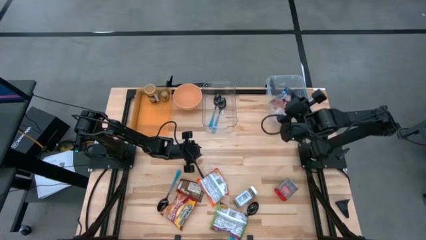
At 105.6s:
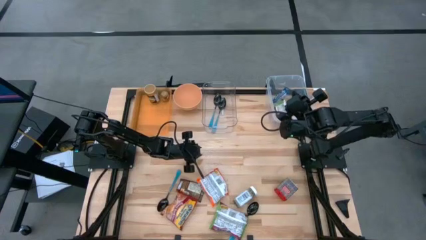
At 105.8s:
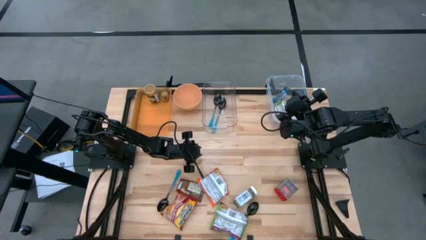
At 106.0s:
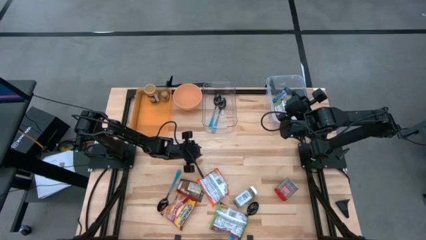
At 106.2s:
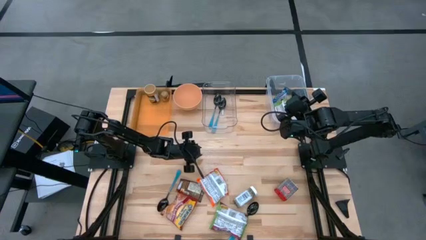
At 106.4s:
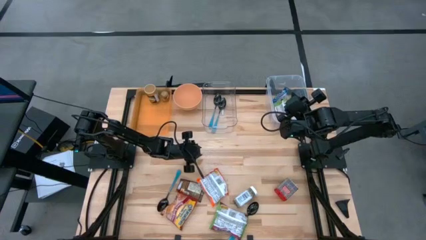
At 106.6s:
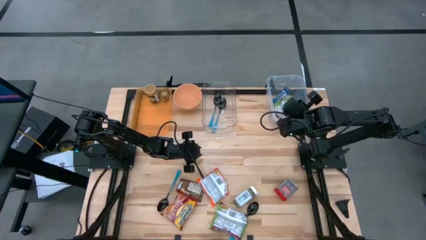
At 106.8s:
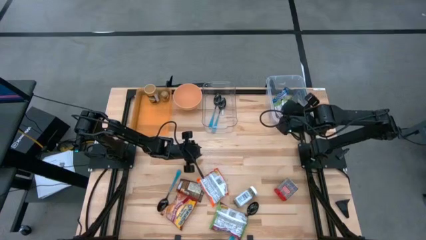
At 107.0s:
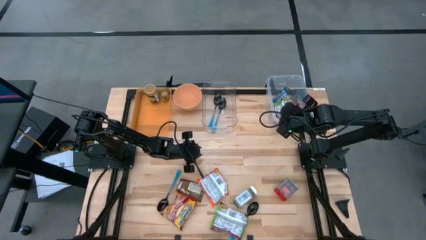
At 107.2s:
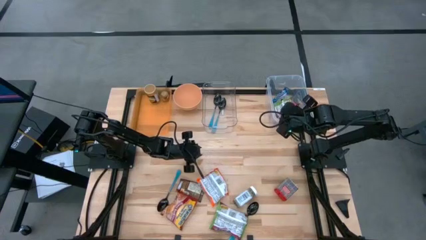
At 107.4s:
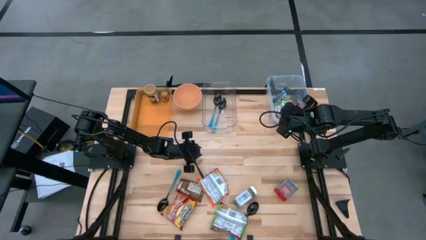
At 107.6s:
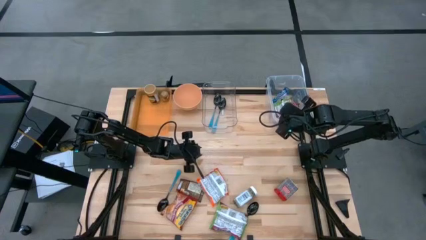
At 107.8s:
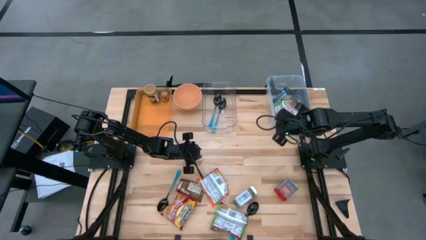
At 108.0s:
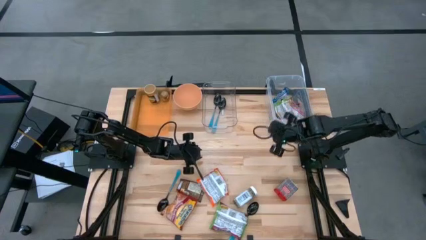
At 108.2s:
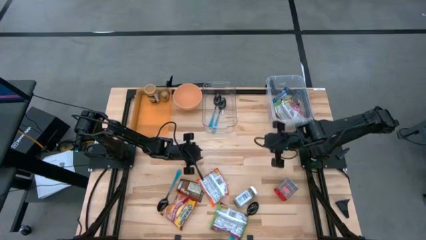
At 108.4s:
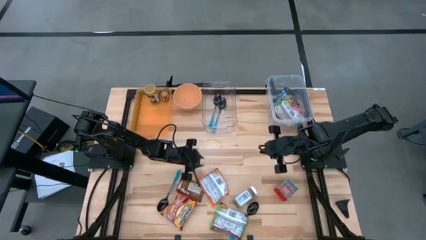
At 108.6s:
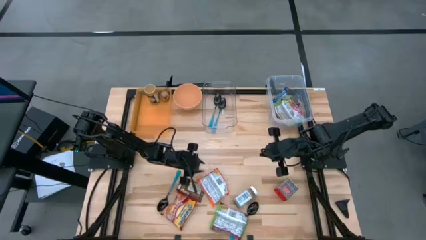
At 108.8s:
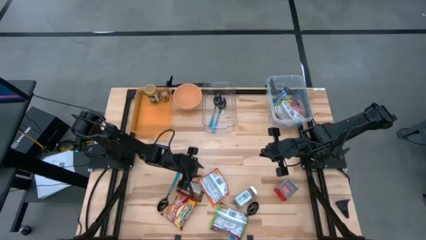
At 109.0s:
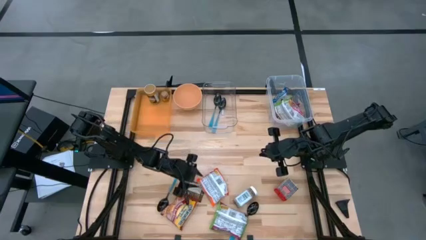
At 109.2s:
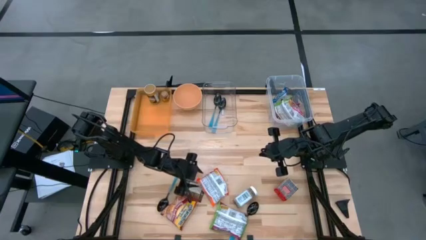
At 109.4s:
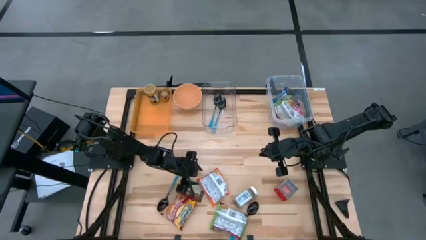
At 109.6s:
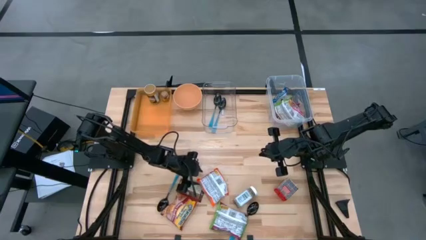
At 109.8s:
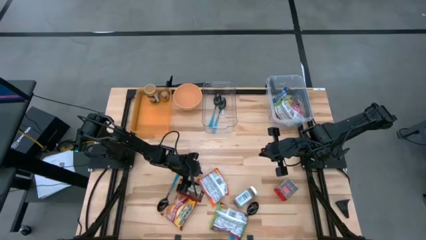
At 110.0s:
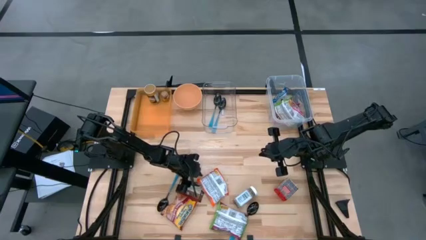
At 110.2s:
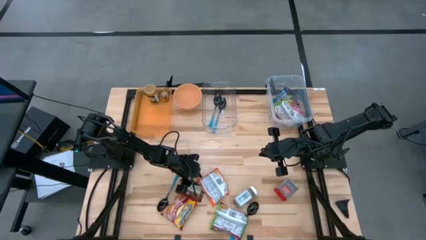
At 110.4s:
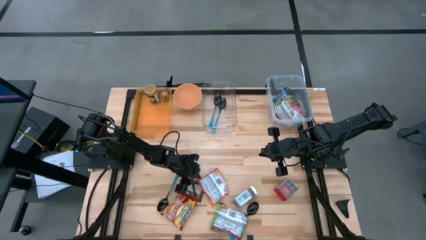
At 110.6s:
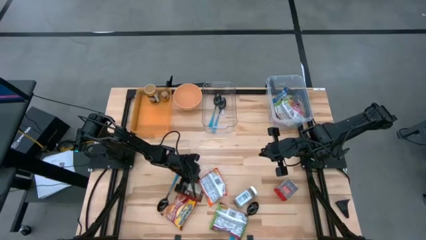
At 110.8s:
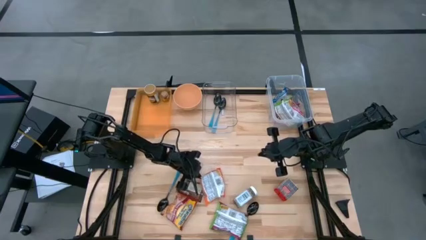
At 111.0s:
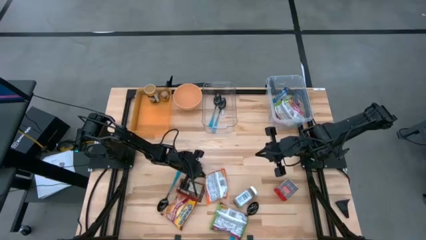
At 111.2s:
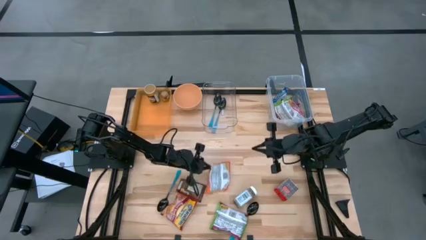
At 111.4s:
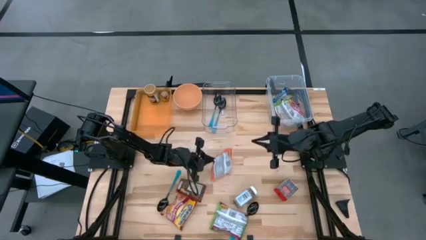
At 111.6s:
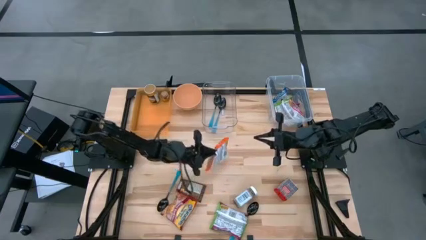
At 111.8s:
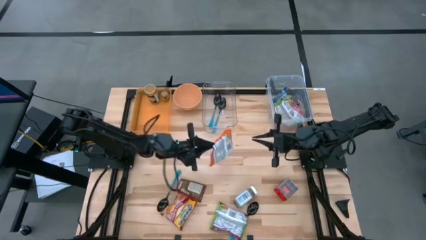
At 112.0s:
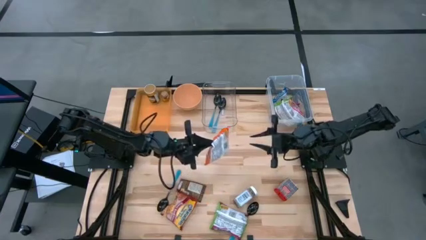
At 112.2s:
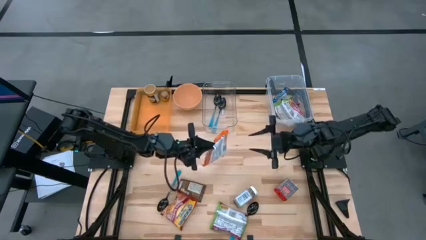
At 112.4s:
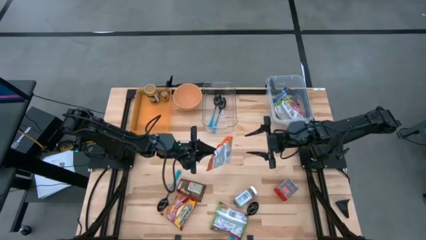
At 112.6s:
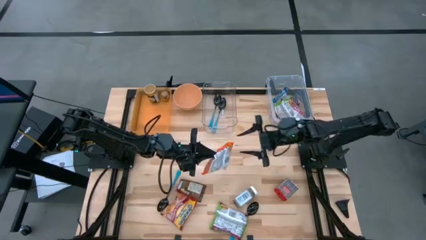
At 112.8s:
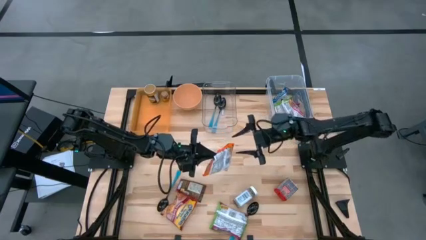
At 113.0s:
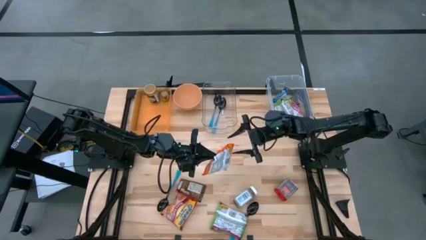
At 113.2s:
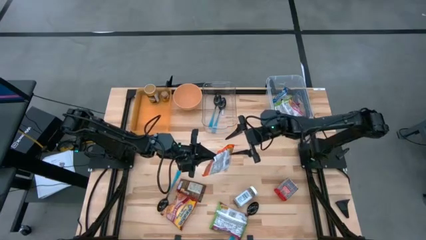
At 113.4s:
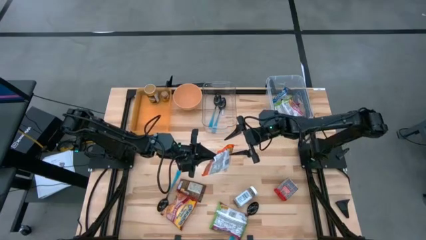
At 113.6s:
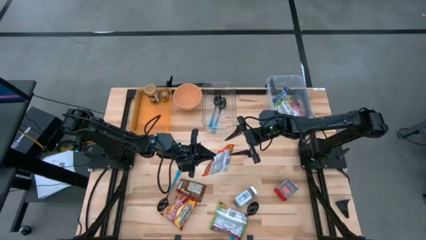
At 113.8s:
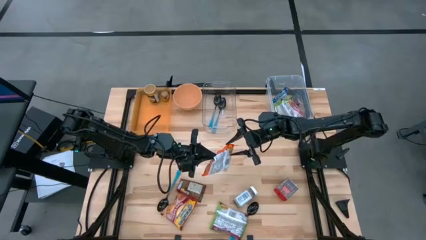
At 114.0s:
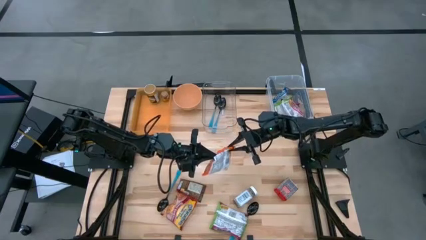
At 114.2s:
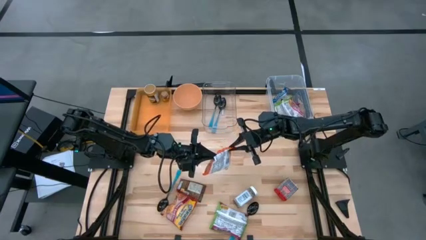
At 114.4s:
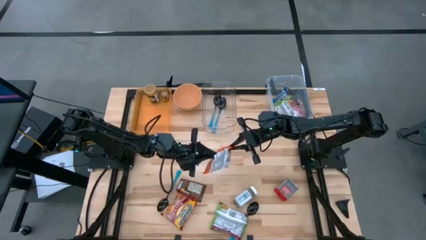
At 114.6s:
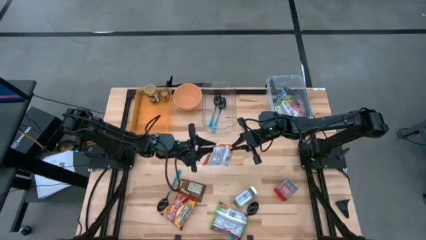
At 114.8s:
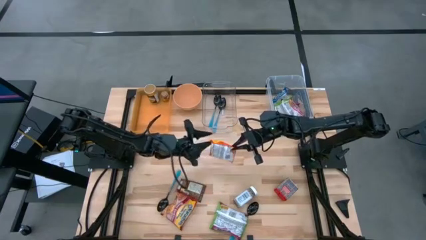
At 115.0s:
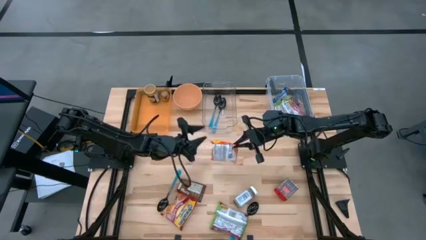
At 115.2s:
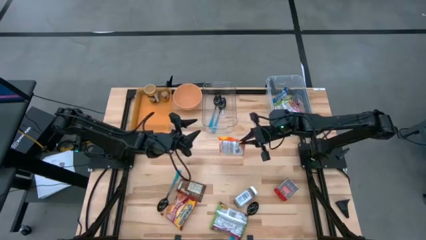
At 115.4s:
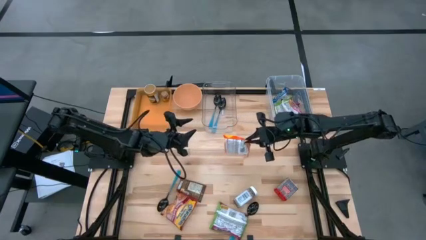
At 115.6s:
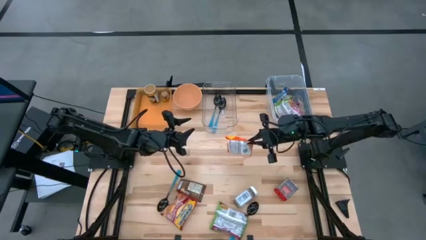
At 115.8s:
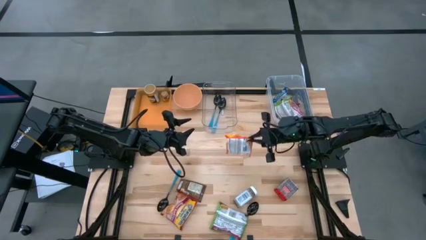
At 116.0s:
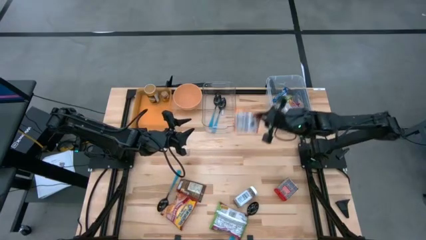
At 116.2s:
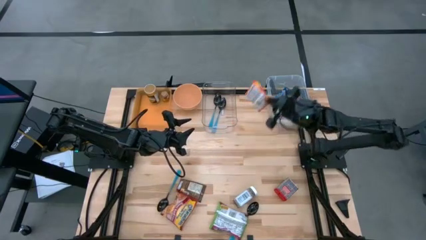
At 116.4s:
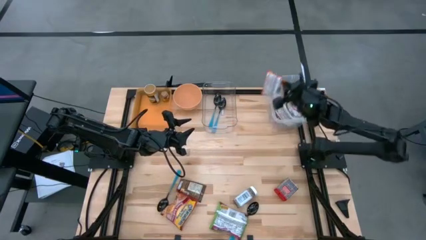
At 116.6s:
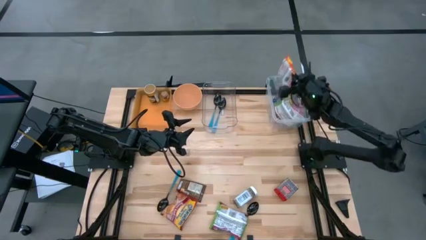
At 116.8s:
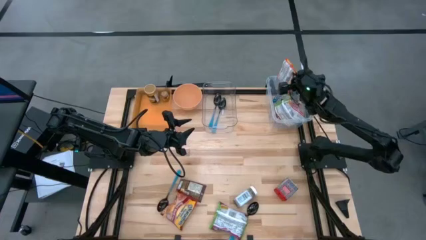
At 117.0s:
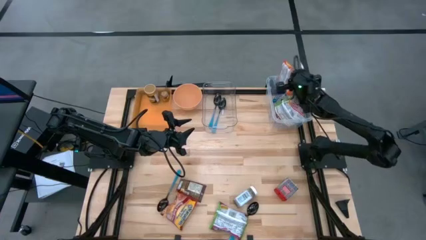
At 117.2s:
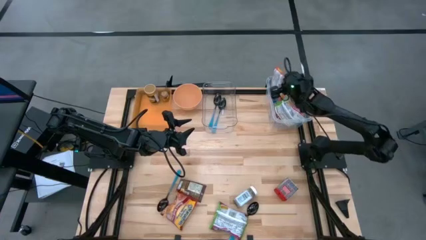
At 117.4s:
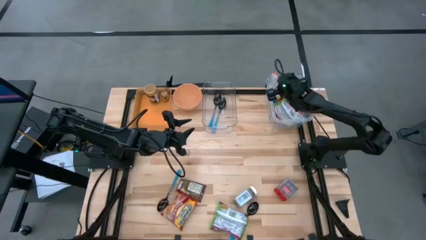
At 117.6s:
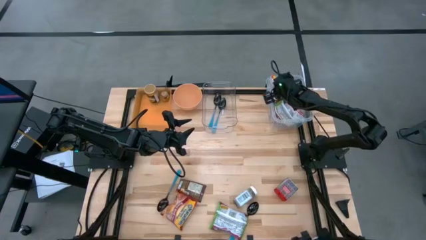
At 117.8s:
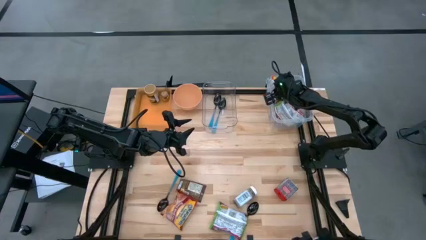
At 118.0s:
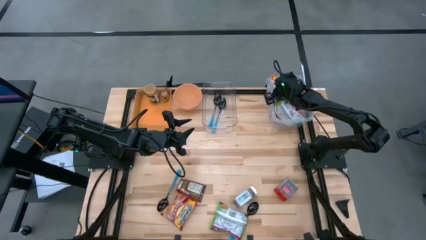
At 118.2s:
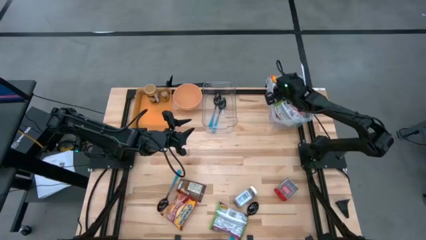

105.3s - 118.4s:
Task: Pick & Place Food Item
Put the orange noodle pack into the transparent container
